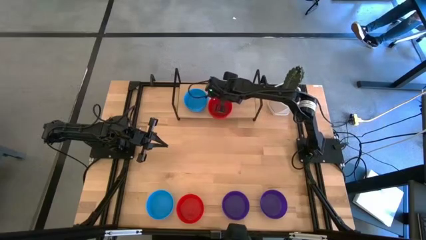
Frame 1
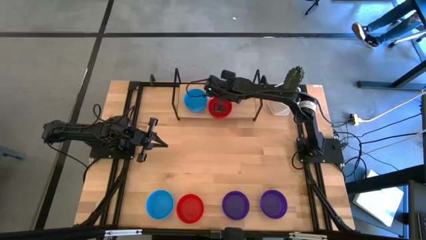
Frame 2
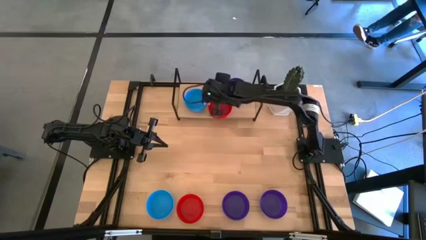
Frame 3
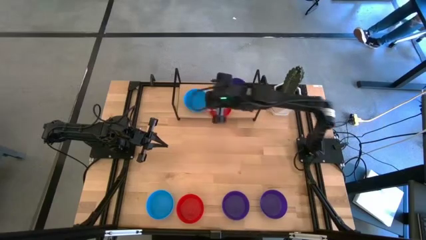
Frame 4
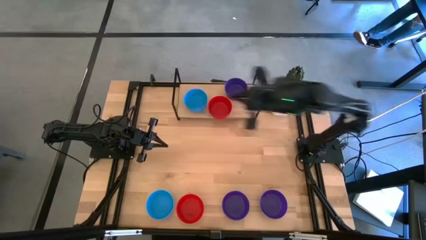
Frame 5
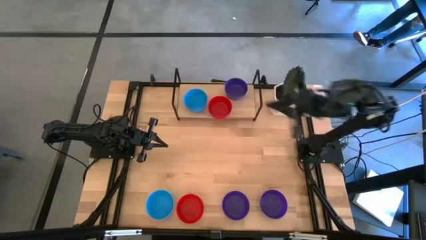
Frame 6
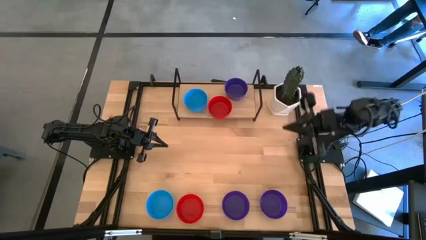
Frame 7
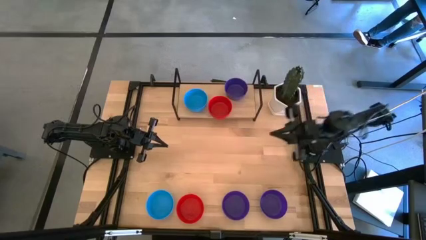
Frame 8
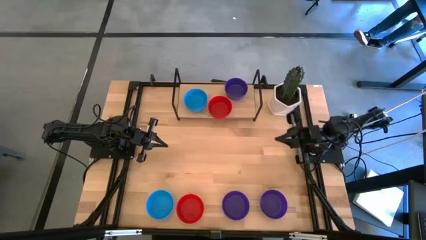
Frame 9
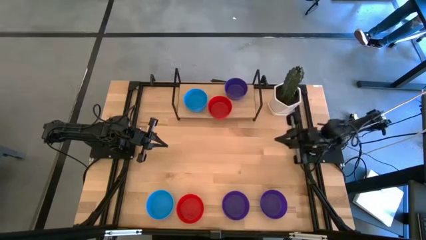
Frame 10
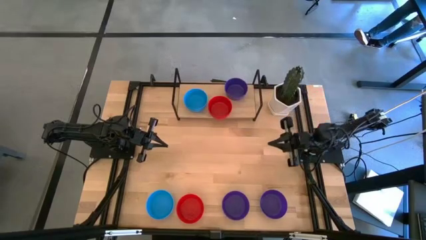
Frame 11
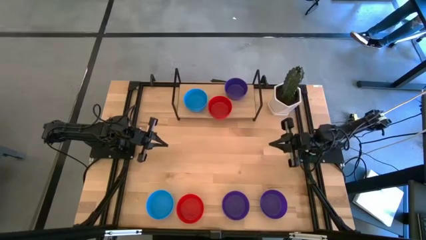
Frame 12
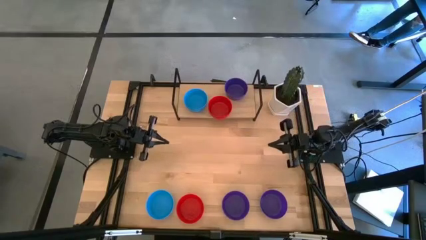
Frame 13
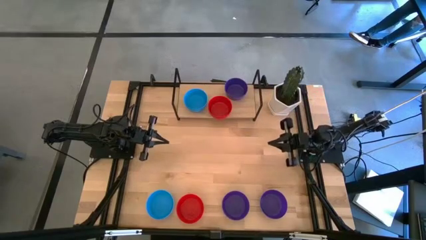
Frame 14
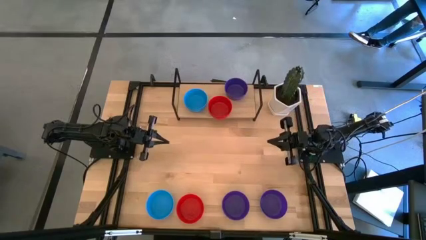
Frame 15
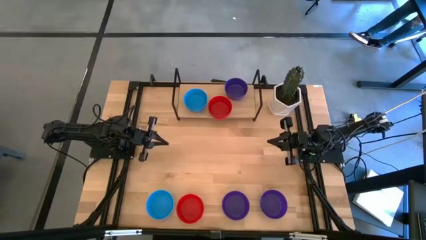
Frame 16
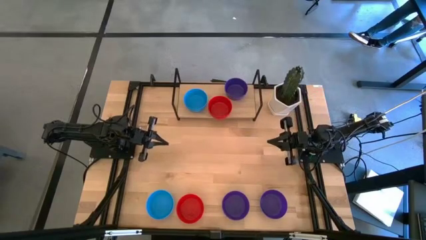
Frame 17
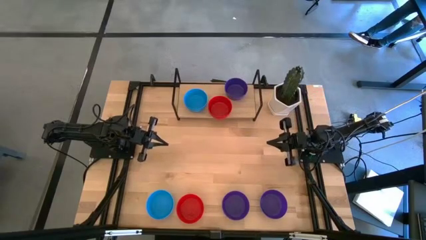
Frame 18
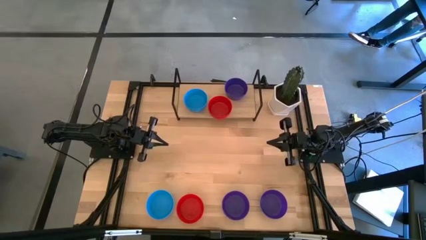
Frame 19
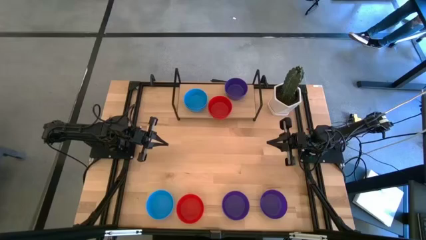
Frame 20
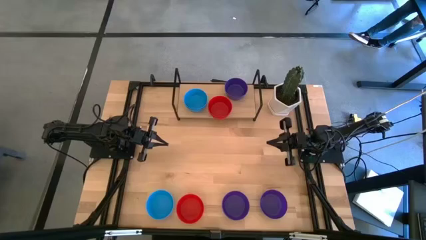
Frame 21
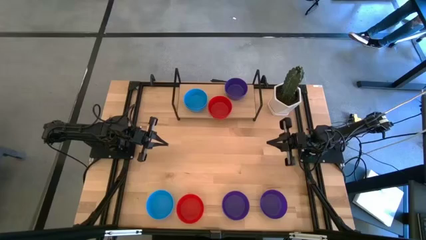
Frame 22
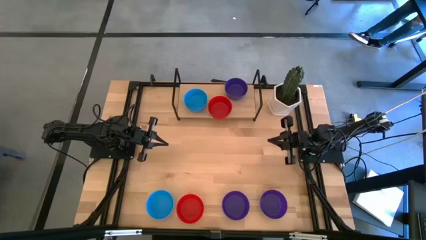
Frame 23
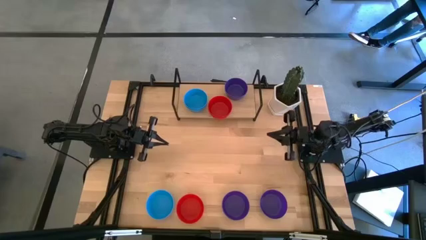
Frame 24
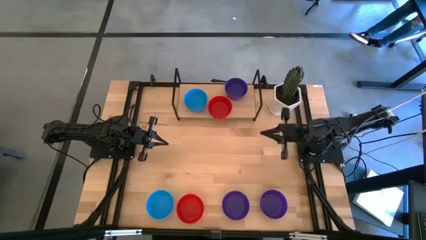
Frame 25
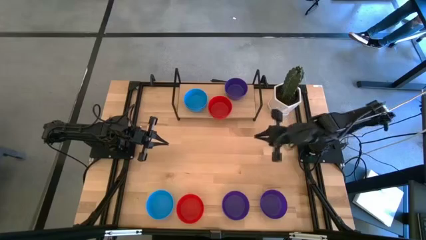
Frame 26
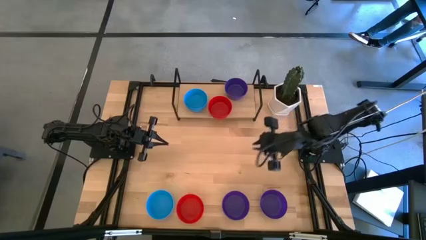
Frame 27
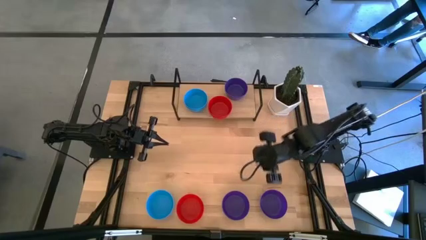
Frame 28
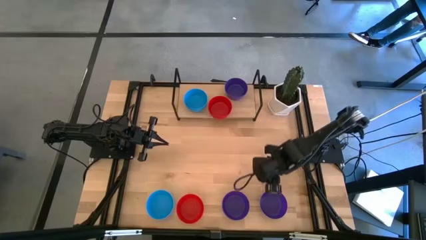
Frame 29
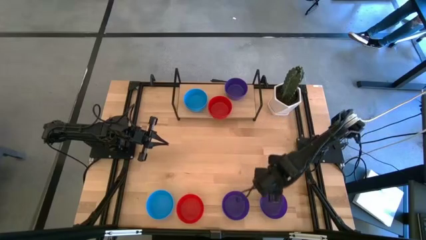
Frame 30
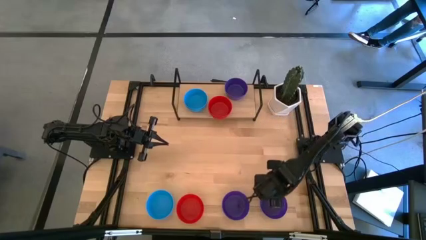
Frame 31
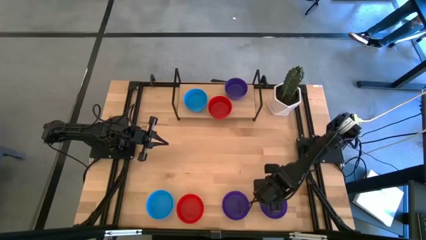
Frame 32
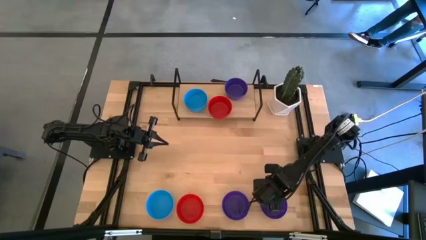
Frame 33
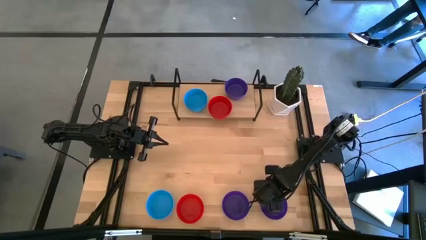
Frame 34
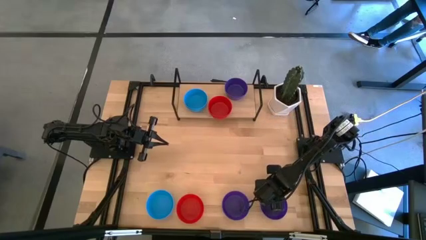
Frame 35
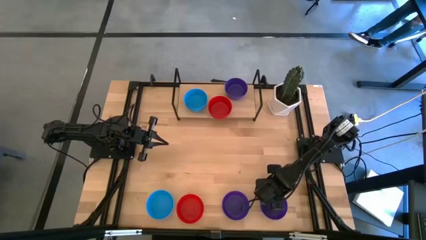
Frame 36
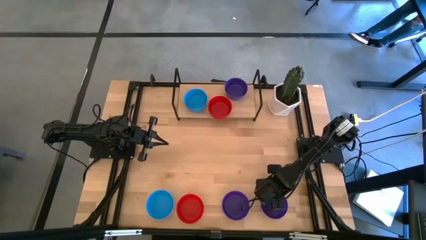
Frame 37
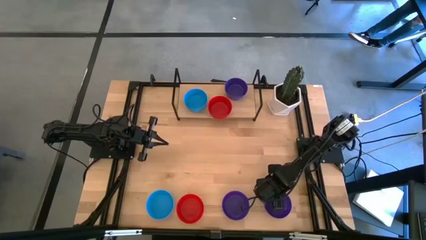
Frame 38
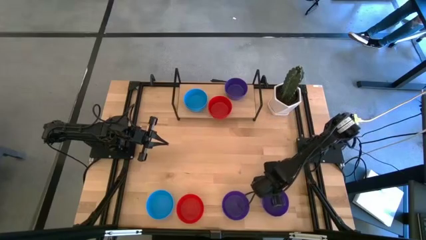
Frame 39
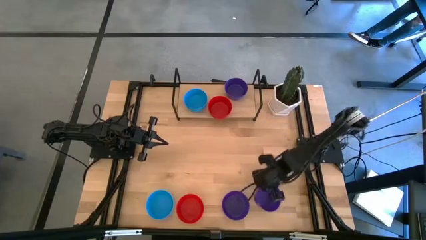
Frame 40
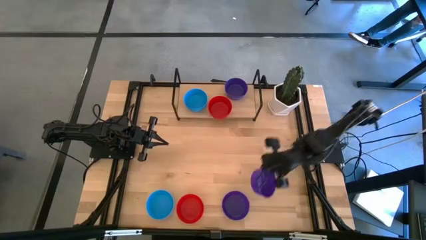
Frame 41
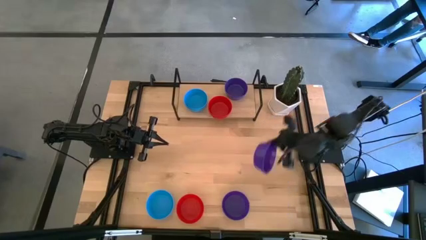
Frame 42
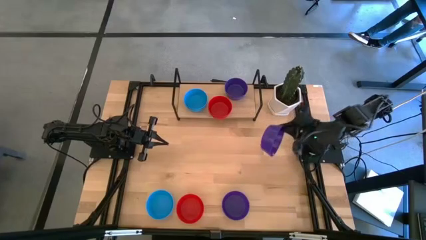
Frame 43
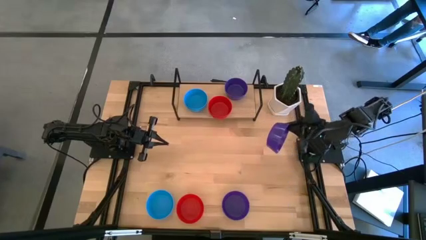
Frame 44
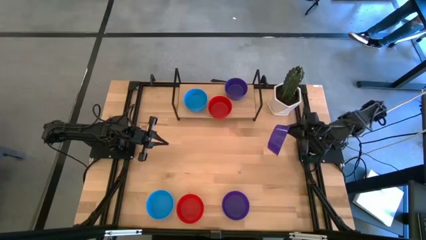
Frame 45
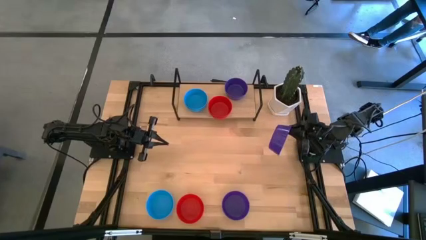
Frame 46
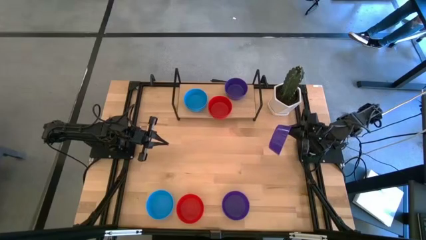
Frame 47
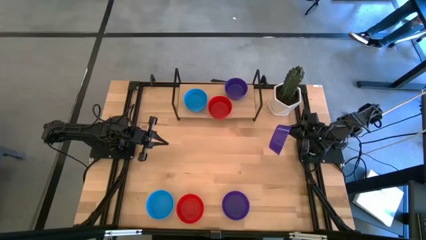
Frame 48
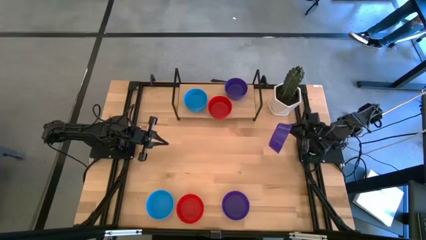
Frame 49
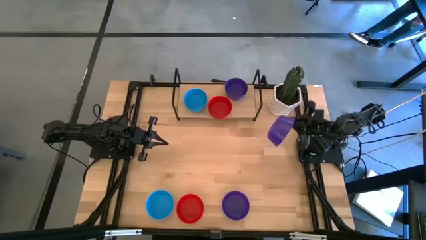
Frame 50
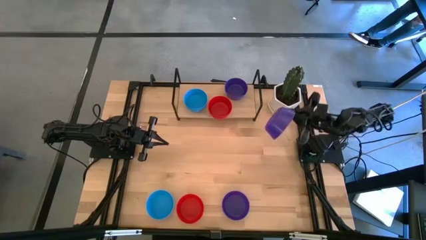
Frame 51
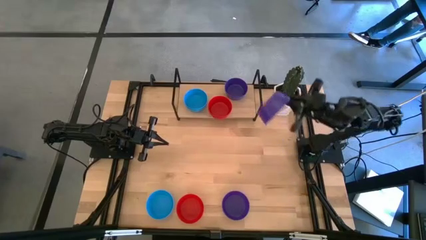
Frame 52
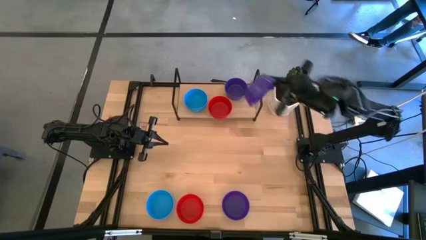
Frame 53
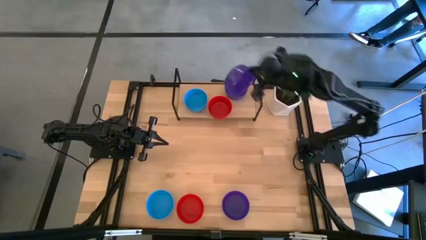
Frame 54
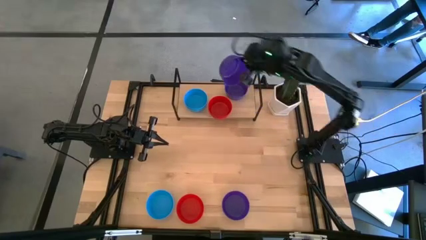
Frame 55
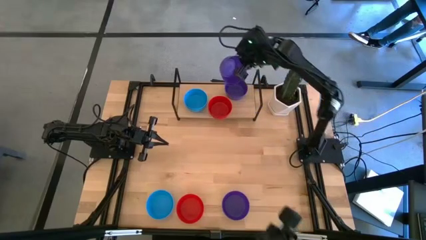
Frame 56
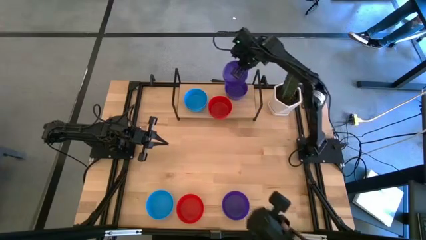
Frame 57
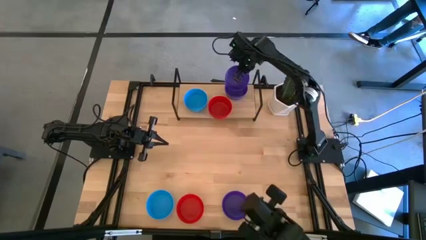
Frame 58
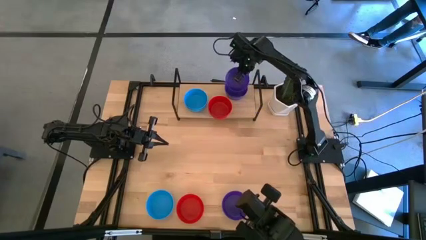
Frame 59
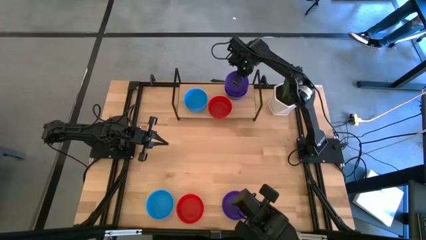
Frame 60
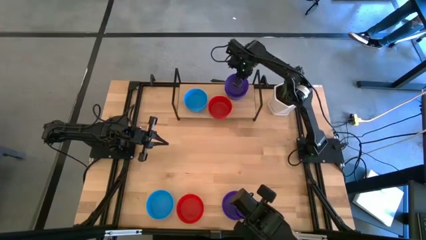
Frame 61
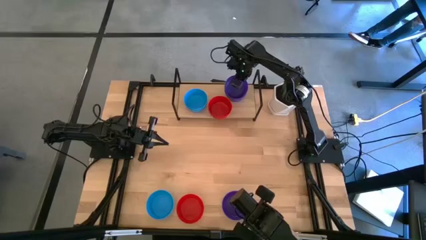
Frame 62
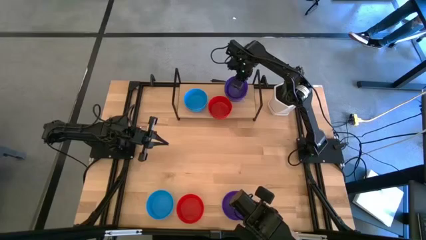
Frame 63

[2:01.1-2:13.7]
Task: Pick & Place Mini bowls
Stack the purple bowl on the purple bowl on the shelf
